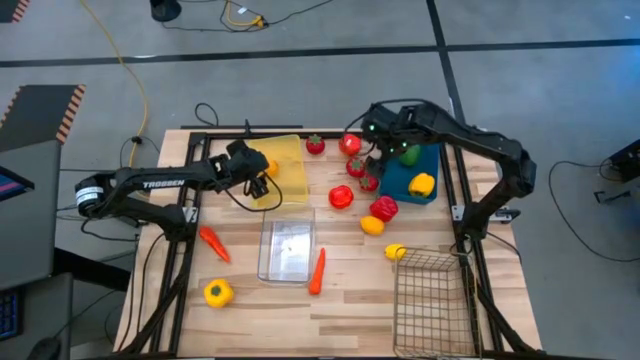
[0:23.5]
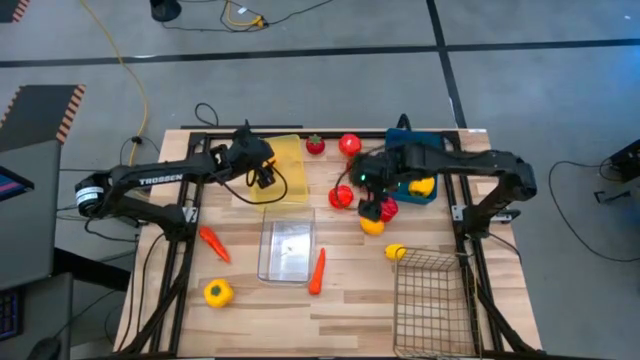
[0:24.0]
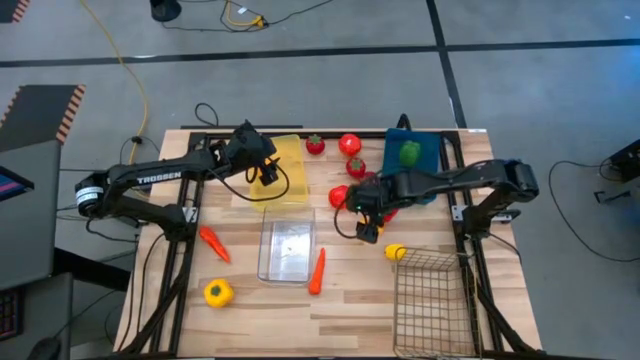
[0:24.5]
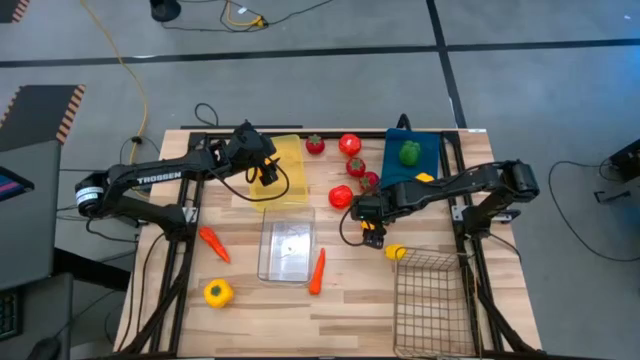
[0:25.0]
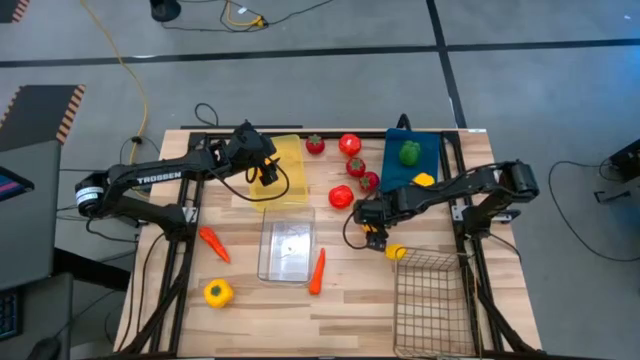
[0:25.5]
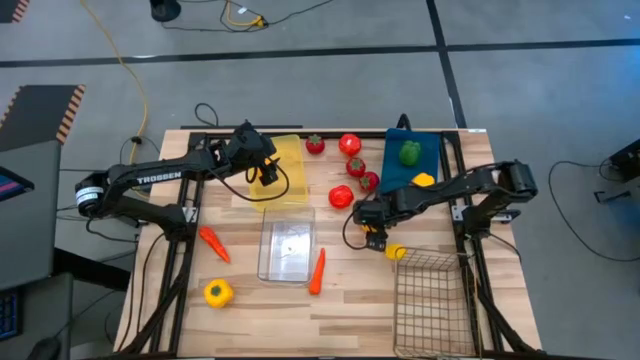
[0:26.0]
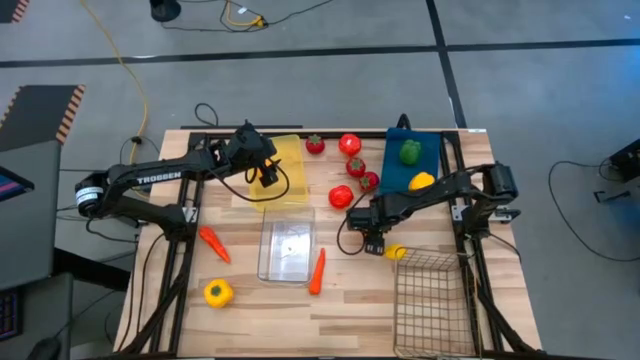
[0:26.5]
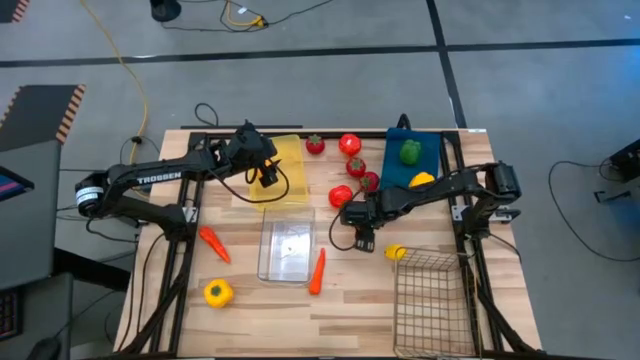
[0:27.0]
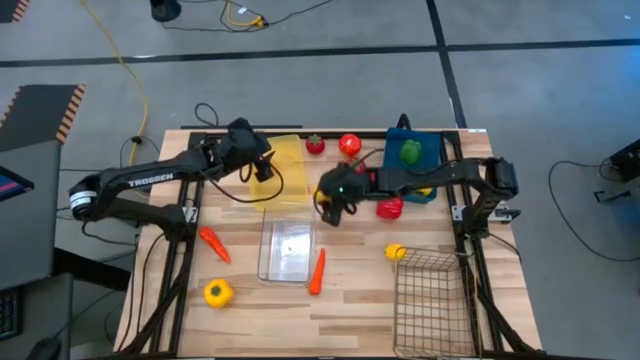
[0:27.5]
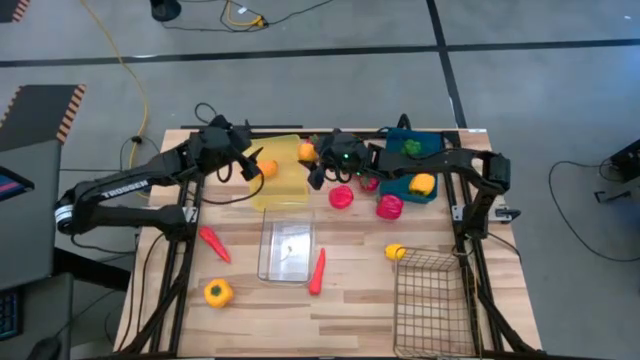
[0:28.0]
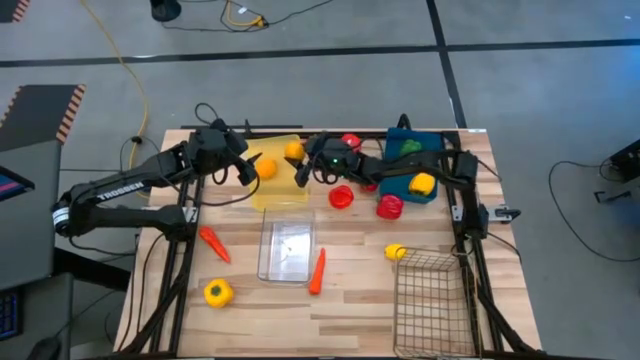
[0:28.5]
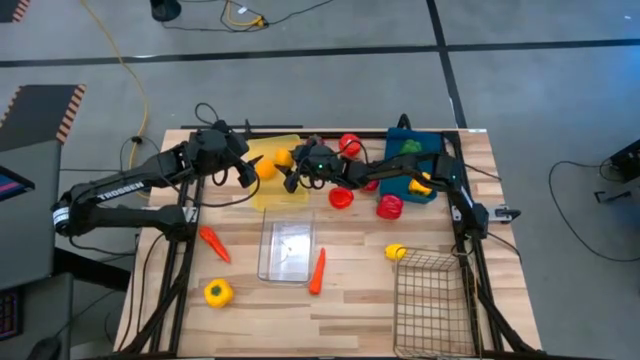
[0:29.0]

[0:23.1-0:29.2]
Task: Sort produce into baskets
Put the top lemon into the yellow bin

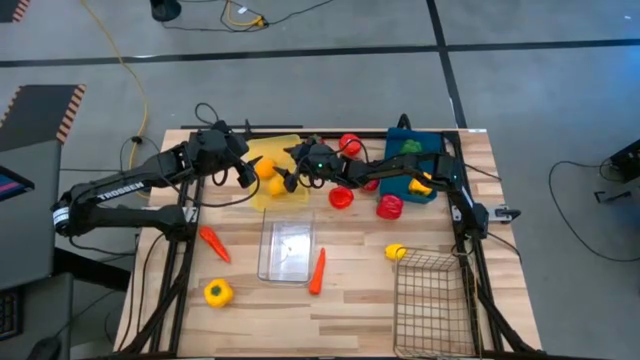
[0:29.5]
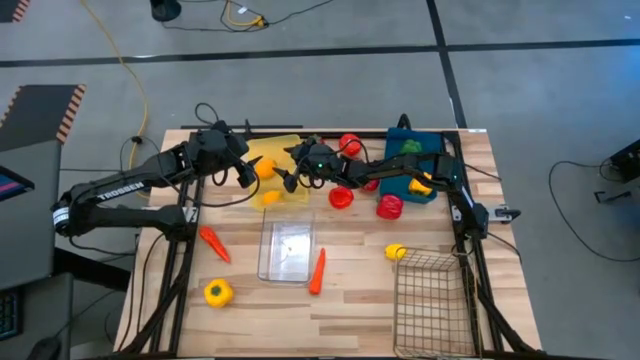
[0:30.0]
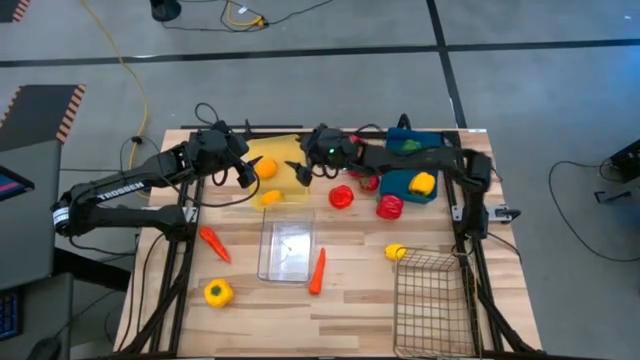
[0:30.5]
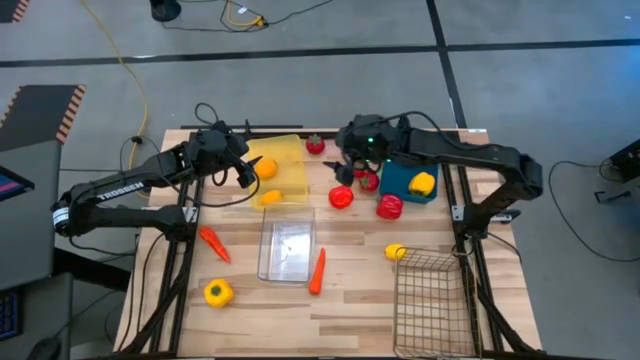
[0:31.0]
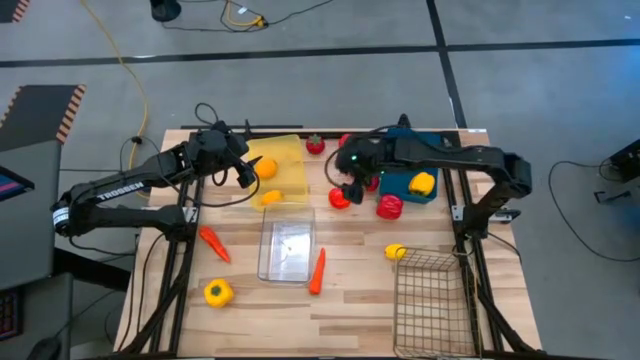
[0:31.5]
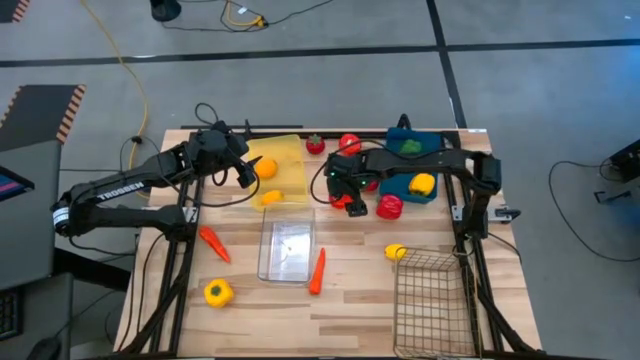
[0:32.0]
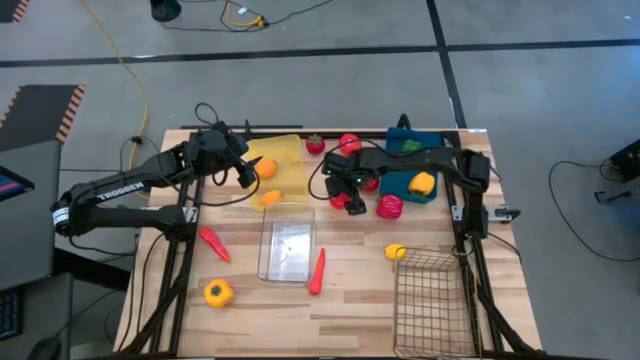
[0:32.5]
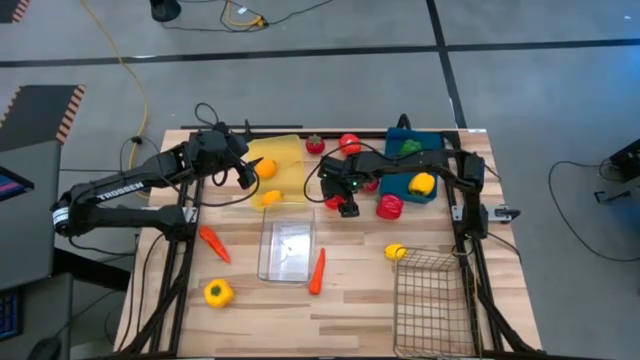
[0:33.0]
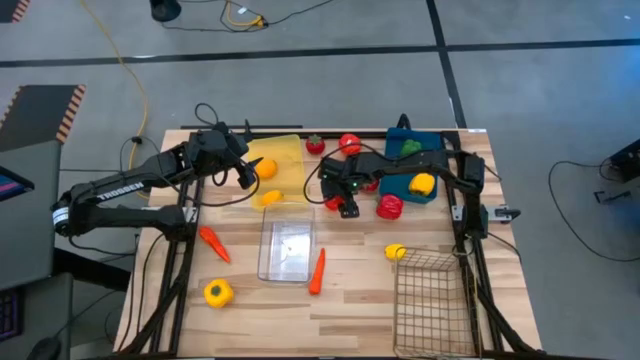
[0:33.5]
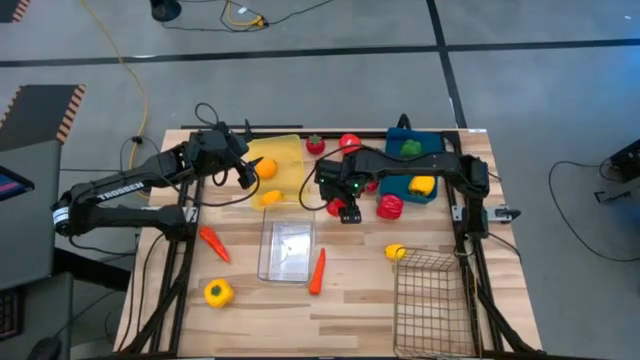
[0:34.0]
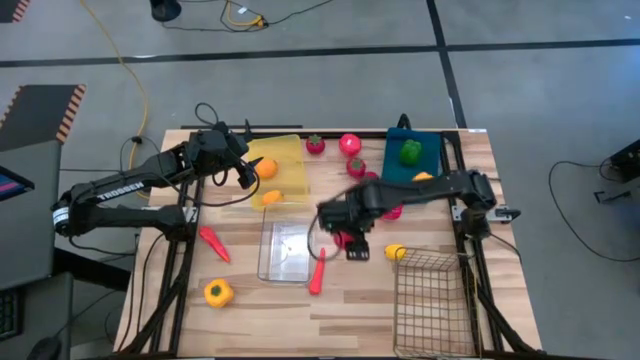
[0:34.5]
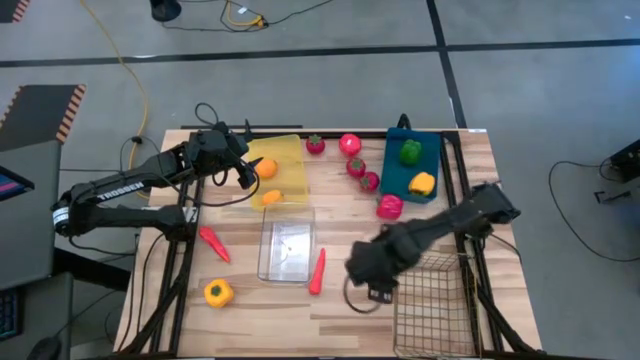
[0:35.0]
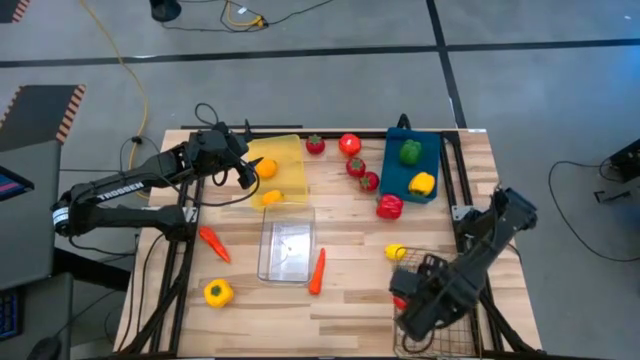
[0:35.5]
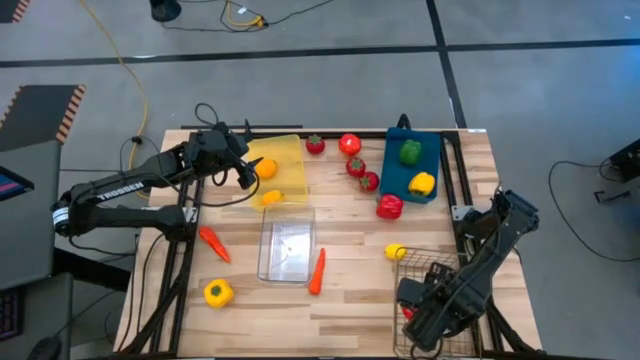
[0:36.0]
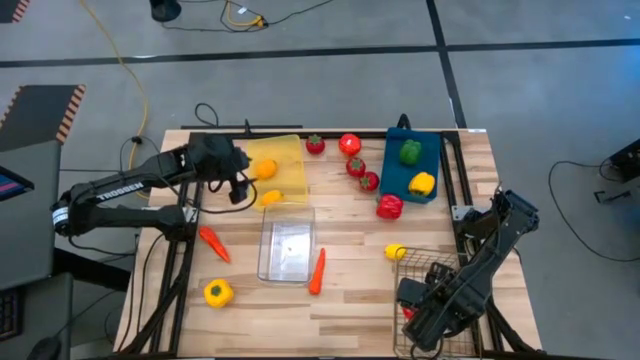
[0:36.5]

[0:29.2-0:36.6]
Put the bottom orange tomato into the wire basket

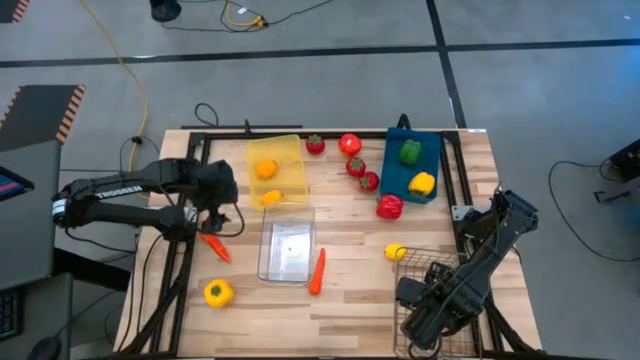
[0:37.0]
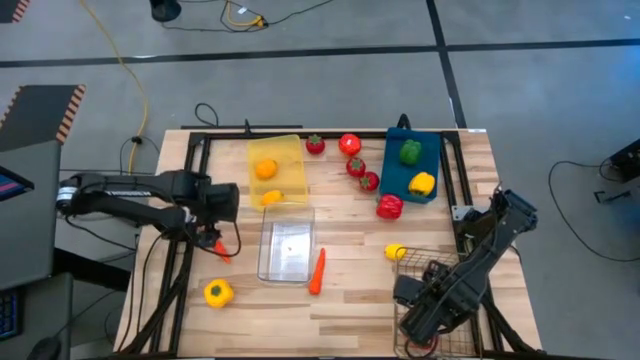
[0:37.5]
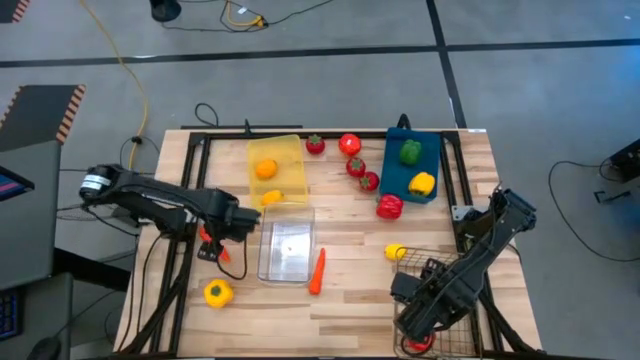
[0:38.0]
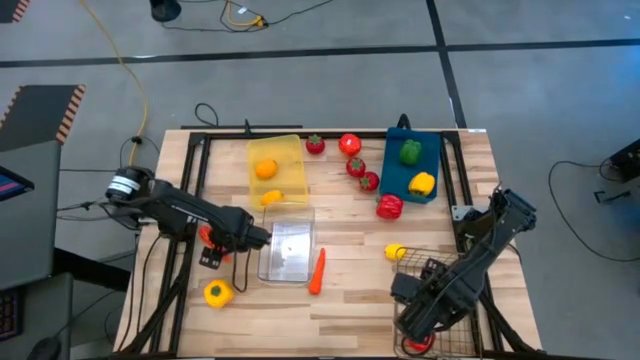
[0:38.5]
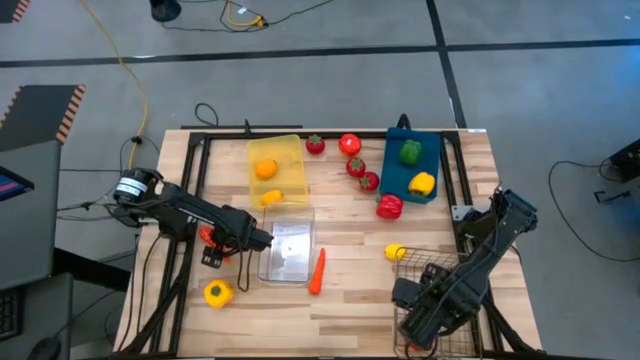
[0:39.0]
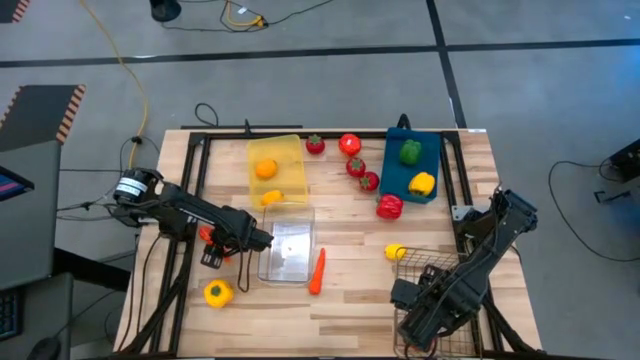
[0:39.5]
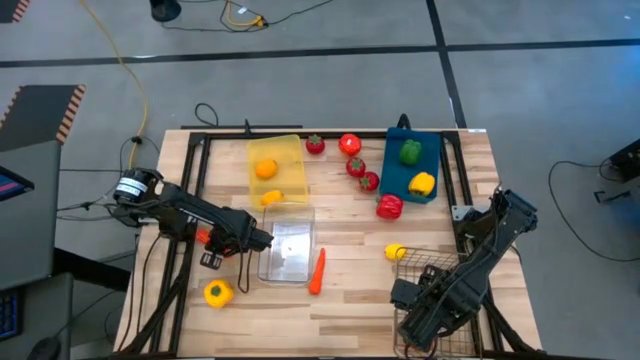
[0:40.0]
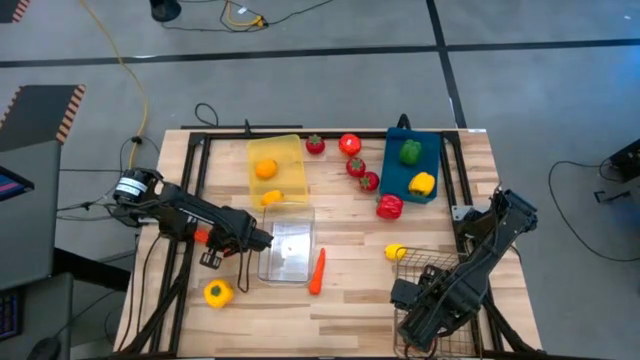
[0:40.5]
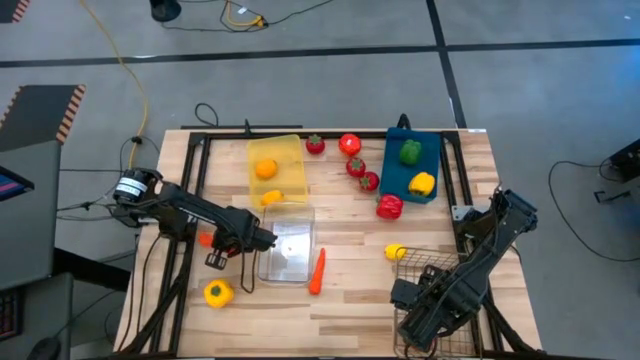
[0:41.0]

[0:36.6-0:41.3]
Put the left orange carrot into the transparent bin

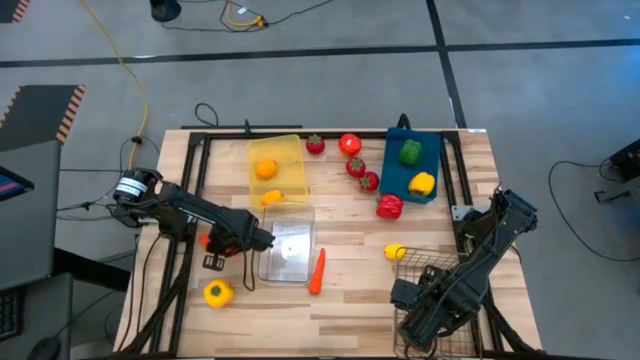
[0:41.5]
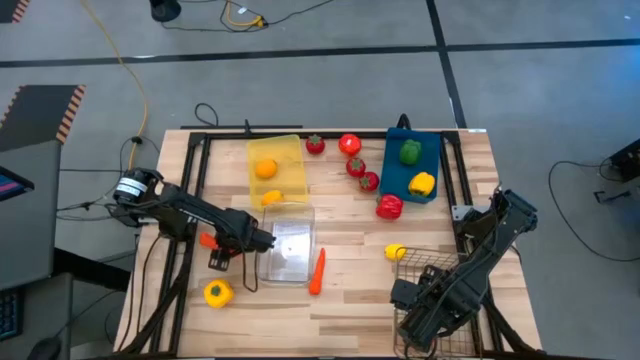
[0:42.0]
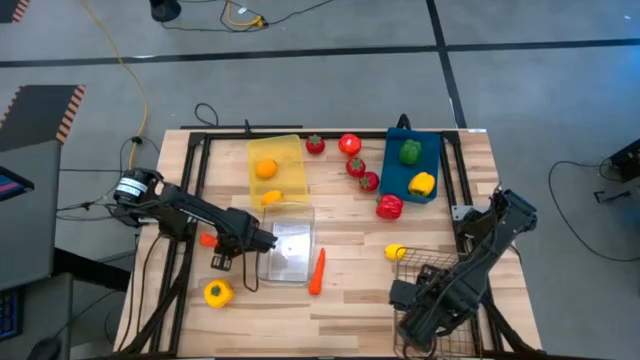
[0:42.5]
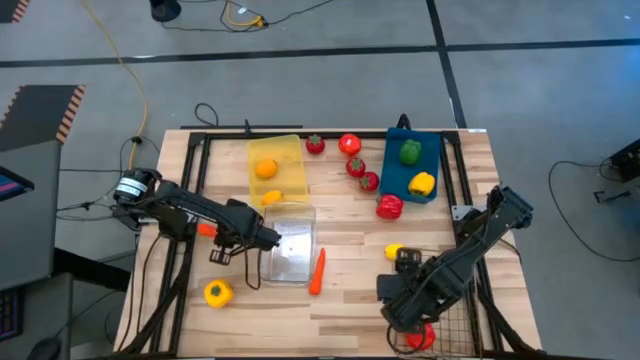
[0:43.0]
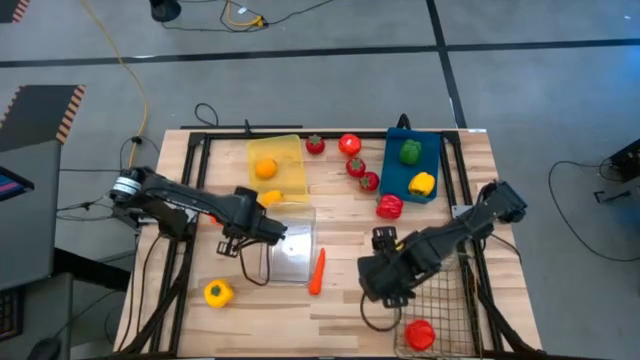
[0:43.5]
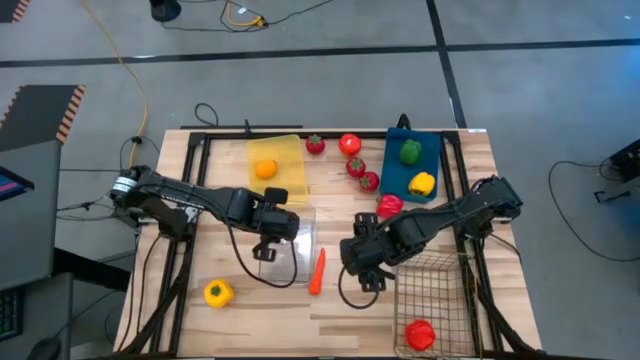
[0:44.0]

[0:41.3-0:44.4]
Put the left carrot into the transparent bin
